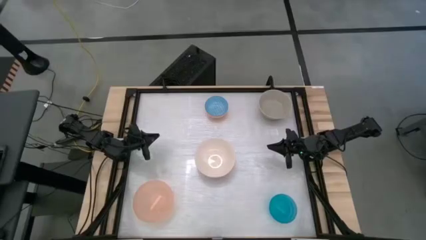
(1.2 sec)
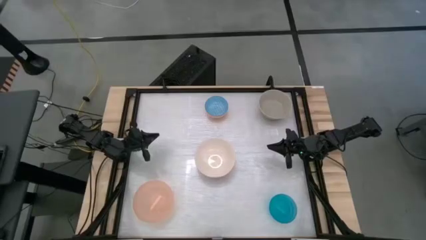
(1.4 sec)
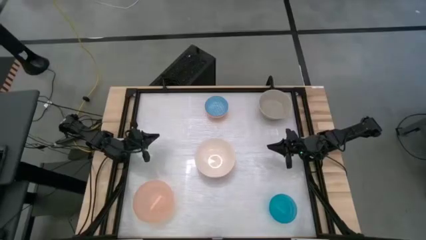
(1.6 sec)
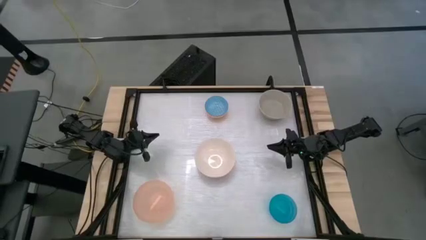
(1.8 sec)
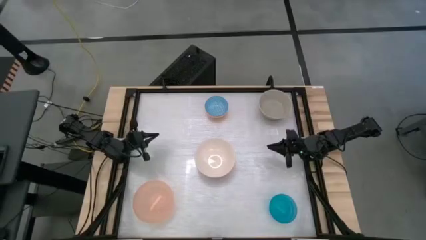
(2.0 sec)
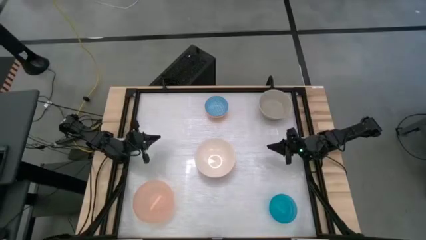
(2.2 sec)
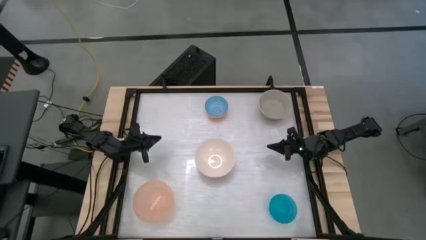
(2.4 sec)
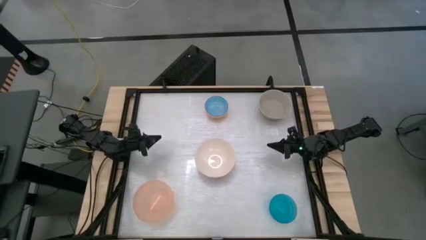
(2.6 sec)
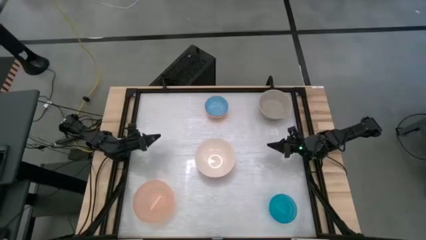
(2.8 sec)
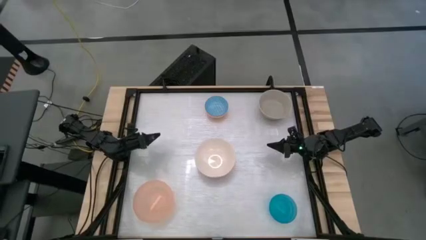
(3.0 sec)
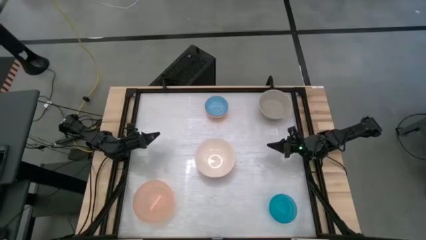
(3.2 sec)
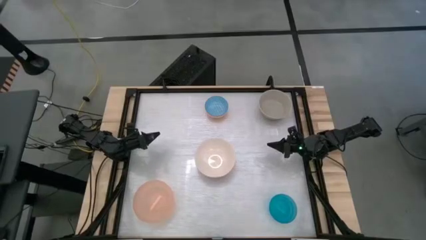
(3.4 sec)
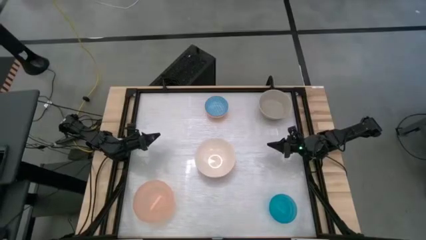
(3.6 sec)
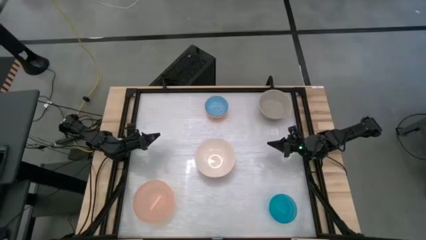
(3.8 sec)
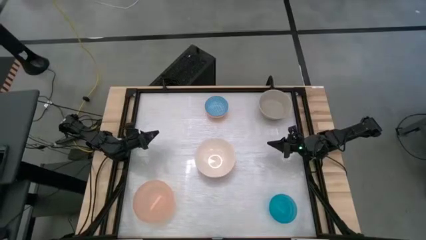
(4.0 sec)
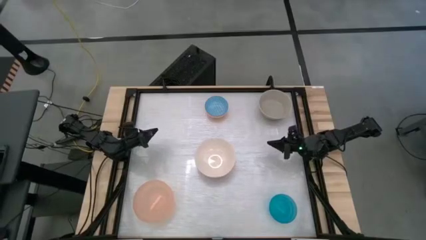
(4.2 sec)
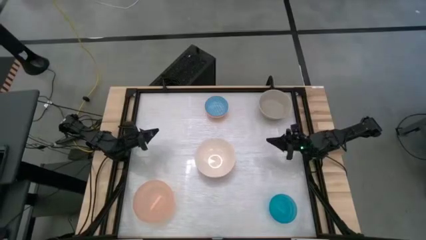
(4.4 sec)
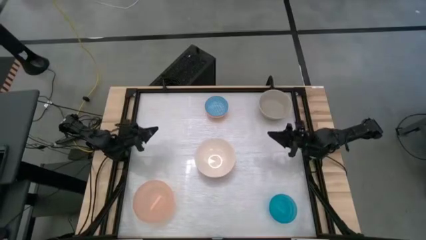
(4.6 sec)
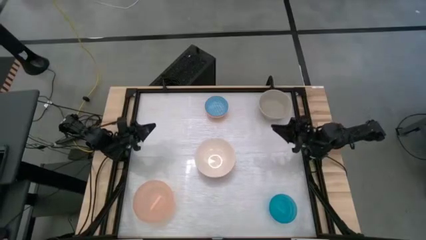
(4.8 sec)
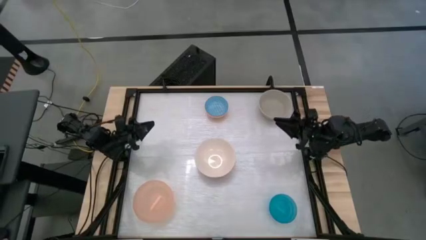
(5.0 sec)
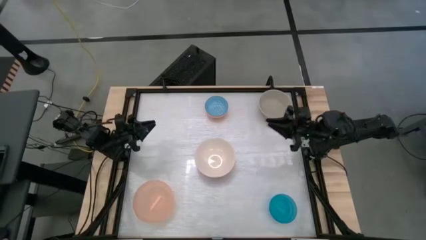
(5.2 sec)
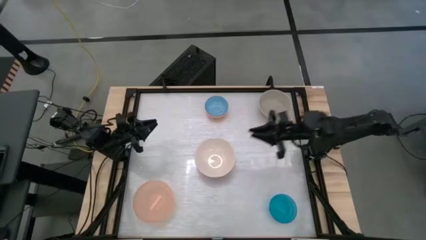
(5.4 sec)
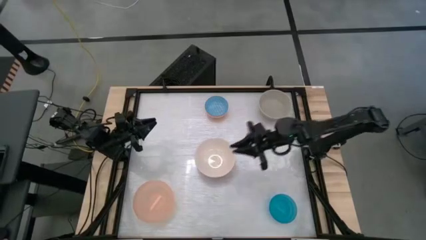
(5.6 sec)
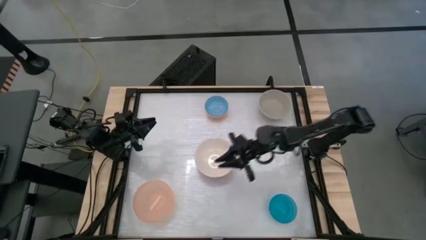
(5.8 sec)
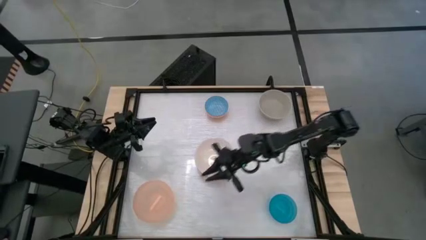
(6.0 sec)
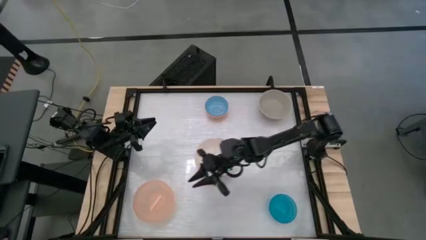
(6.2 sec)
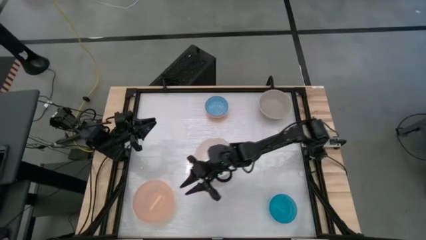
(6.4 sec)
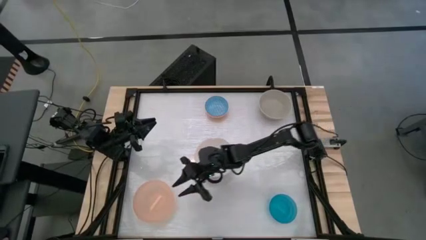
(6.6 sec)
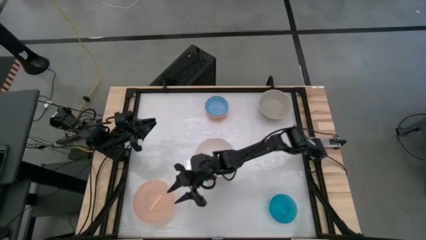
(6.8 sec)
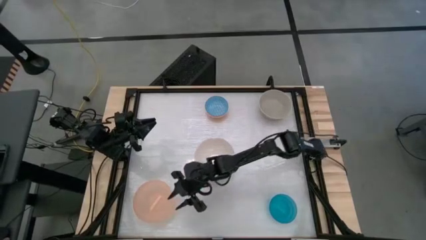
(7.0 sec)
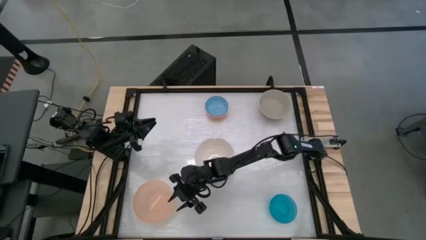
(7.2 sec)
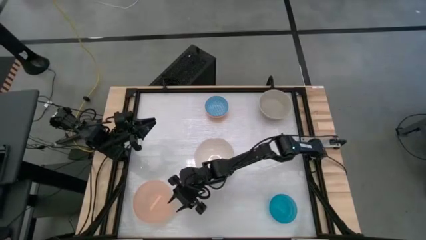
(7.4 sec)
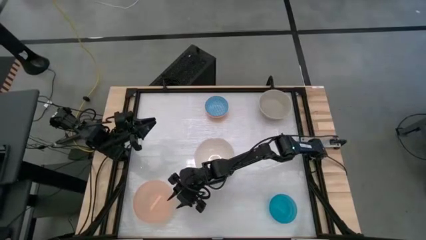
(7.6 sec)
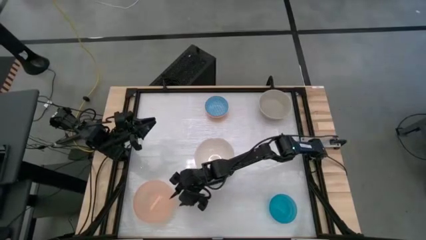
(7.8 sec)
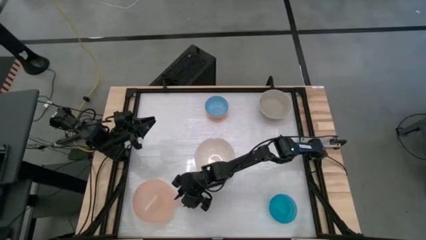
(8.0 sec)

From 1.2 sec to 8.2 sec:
Stack the orange bowl on top of the pink bowl

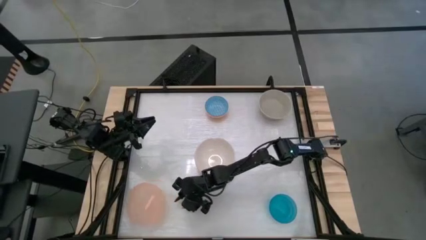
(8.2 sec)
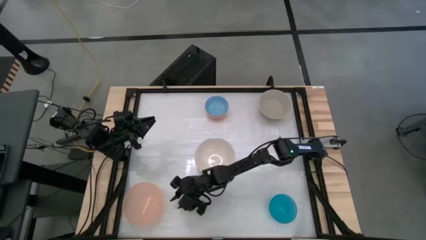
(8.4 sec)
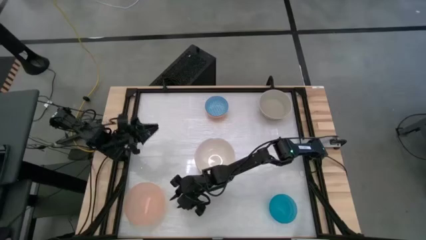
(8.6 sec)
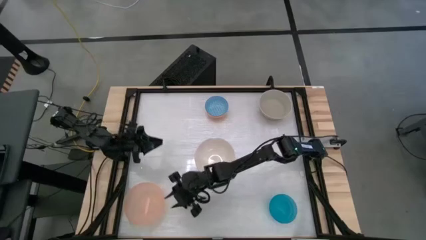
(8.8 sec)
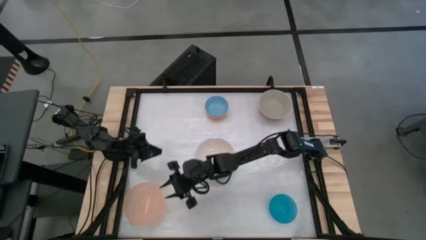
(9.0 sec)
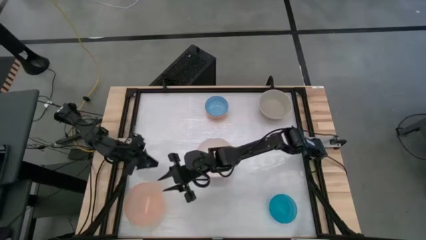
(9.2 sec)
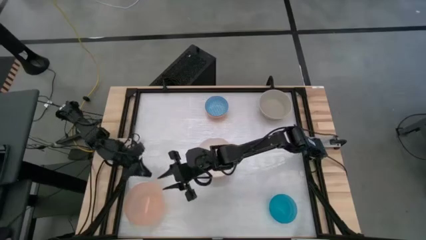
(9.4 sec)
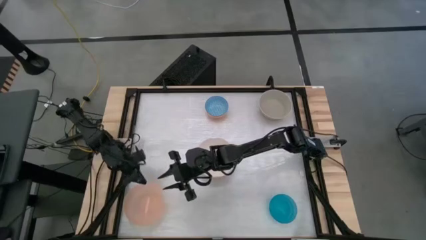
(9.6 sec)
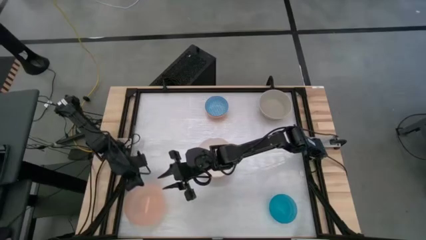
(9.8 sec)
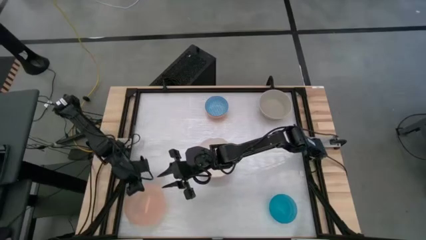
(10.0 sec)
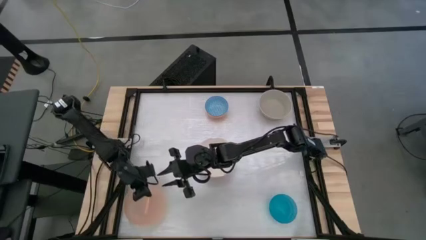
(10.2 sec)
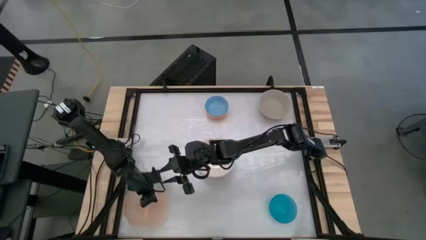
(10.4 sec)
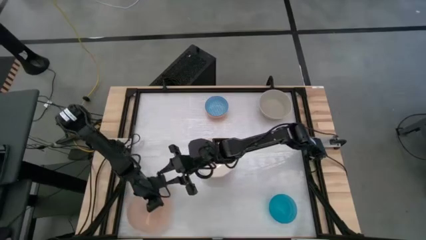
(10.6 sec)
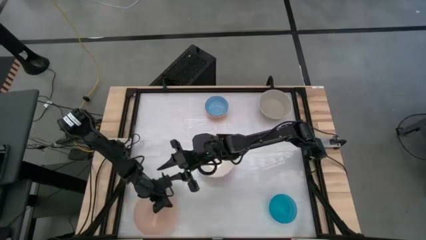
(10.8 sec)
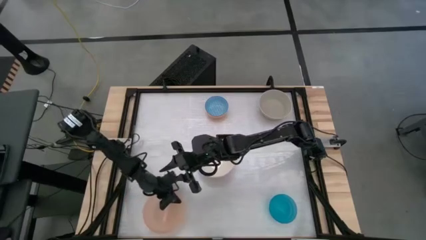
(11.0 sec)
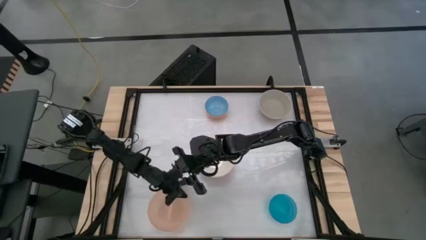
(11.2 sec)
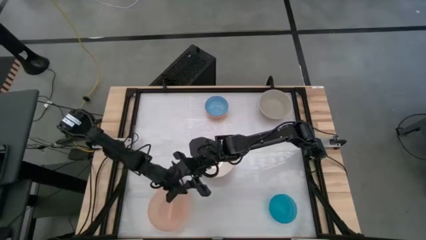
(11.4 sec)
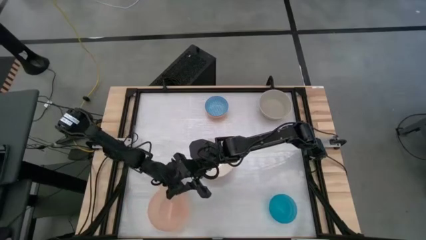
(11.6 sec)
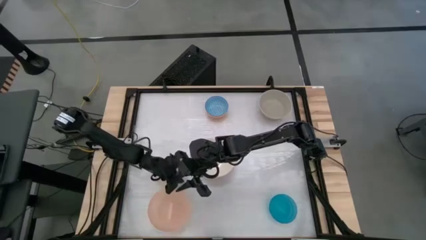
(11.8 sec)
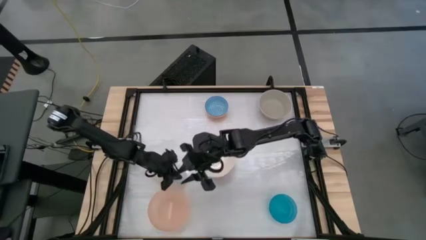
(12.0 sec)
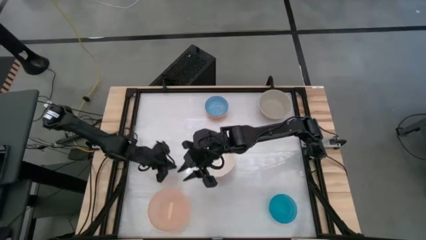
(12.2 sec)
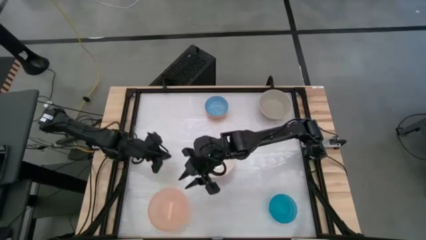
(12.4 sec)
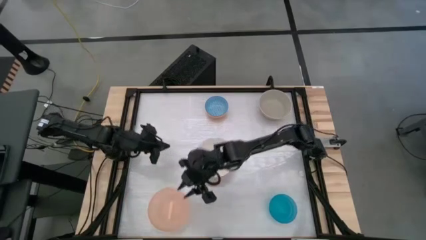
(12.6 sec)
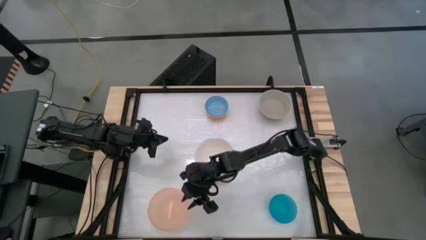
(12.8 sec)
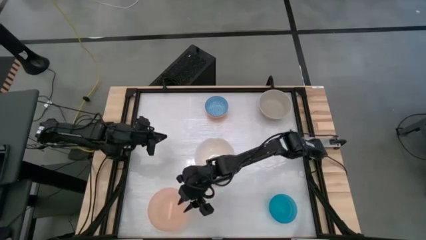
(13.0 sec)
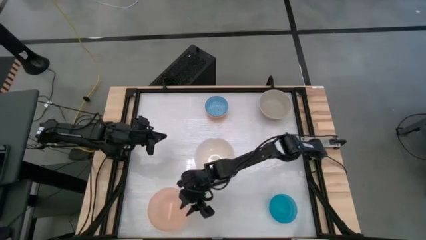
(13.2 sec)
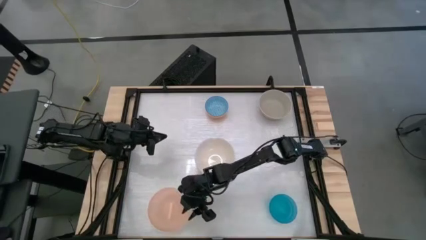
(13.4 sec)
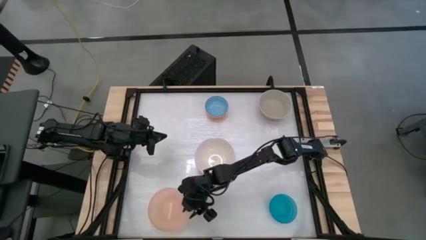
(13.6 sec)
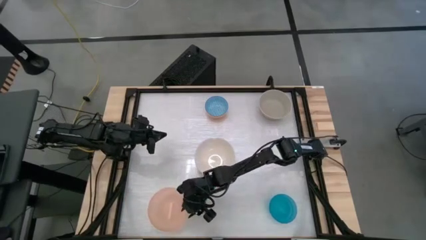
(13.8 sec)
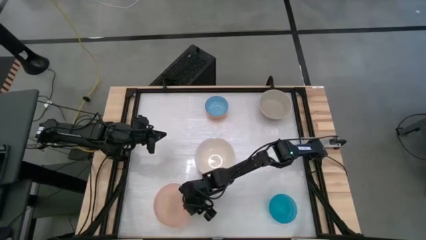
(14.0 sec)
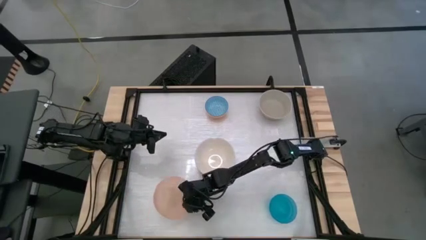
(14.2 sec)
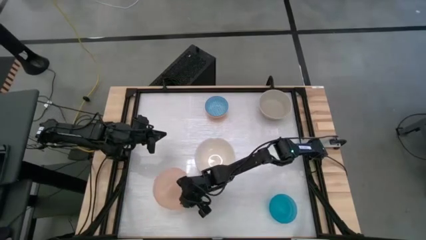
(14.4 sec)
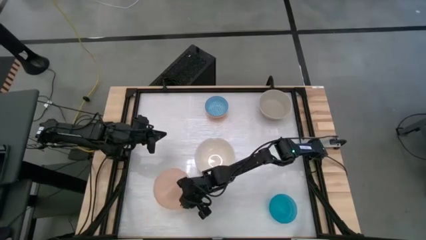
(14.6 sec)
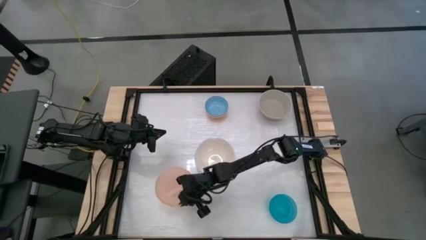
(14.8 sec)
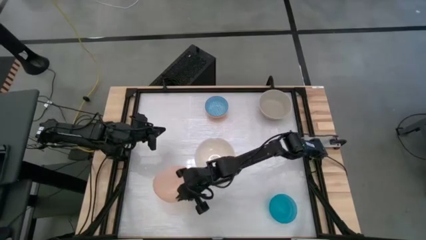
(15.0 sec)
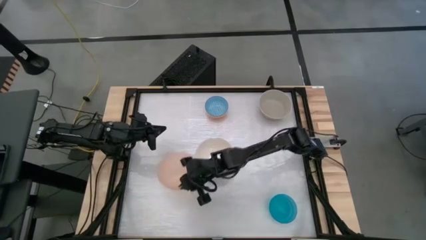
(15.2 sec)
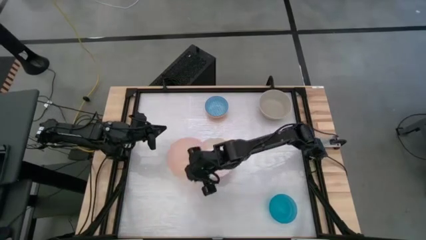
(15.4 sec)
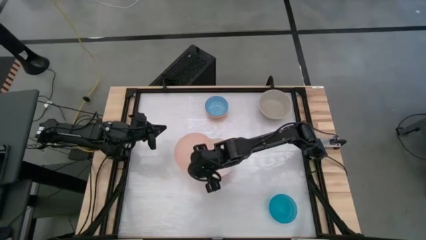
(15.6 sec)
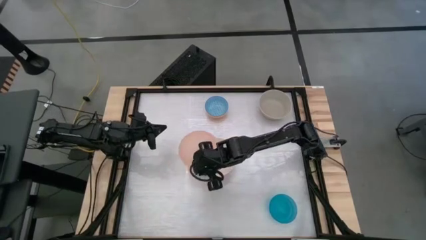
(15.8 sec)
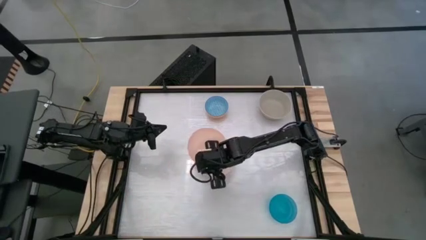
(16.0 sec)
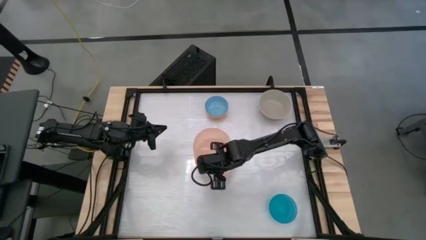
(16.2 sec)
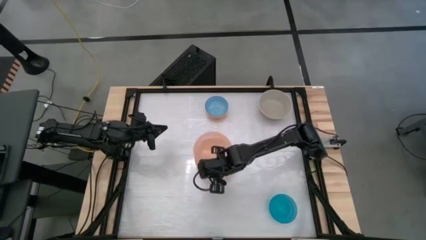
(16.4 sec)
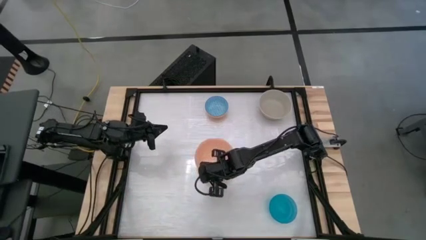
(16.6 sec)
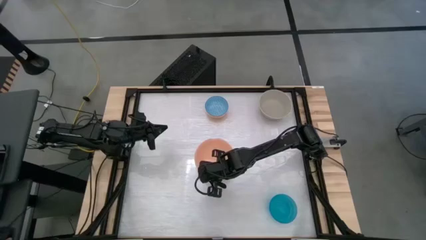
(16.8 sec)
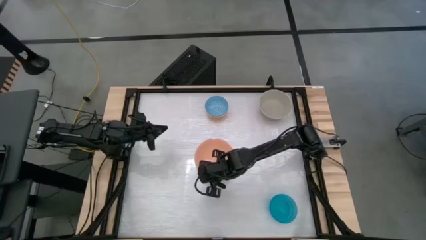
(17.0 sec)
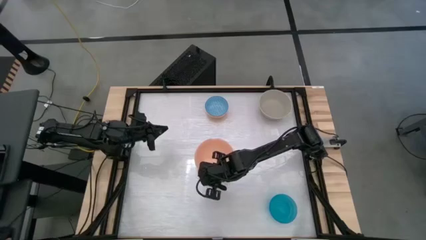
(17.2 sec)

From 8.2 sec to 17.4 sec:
Stack the orange bowl on top of the pink bowl
